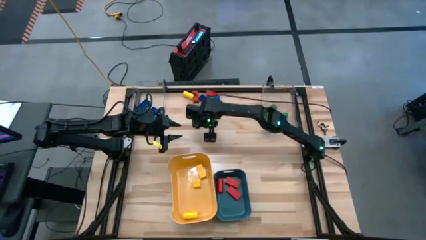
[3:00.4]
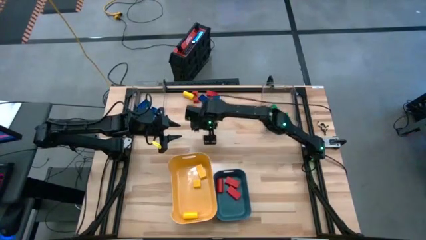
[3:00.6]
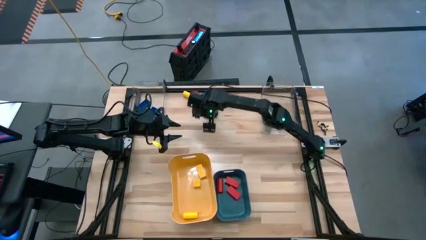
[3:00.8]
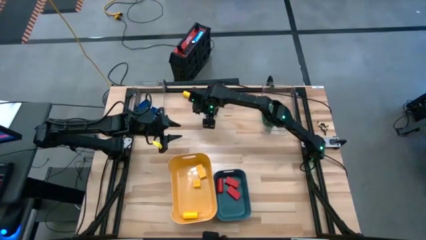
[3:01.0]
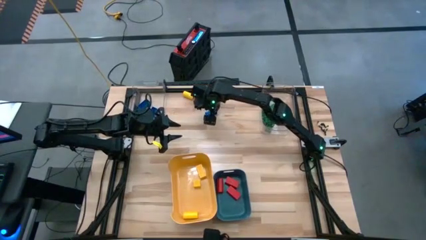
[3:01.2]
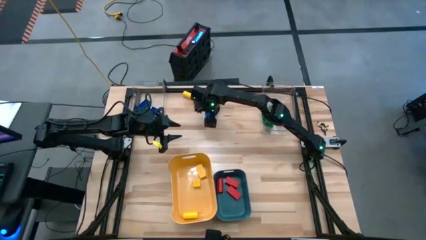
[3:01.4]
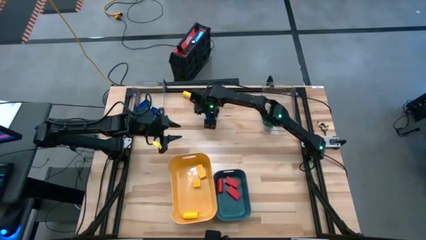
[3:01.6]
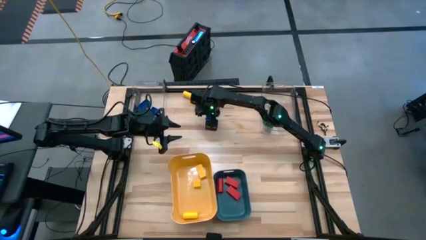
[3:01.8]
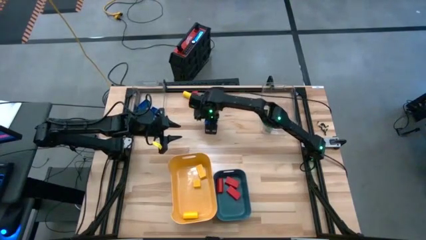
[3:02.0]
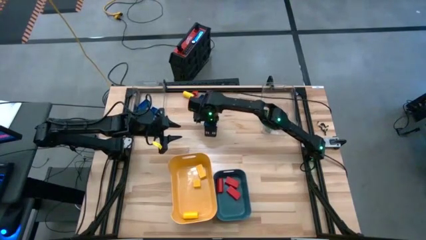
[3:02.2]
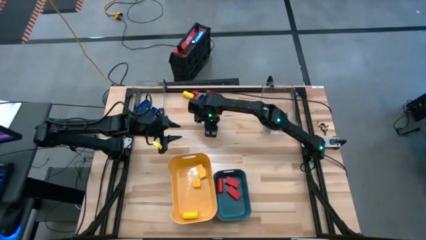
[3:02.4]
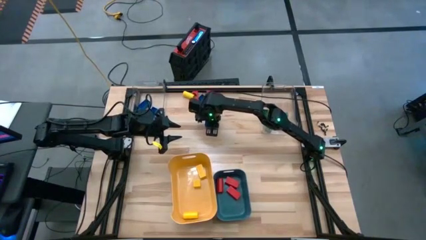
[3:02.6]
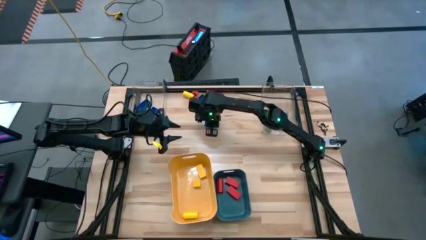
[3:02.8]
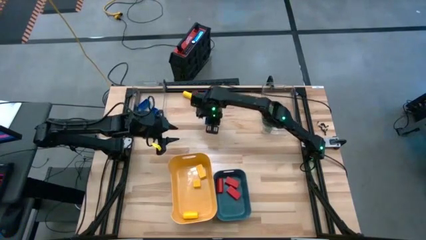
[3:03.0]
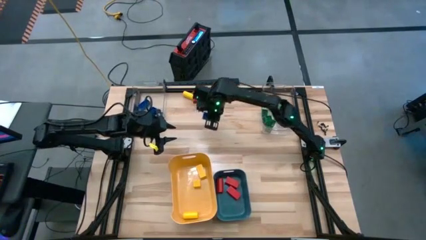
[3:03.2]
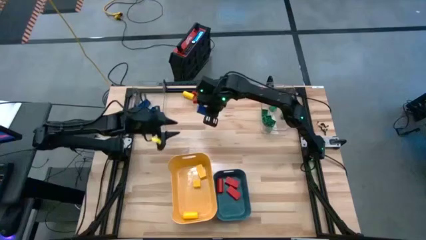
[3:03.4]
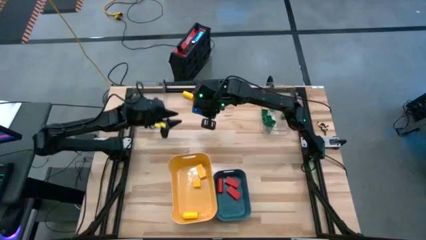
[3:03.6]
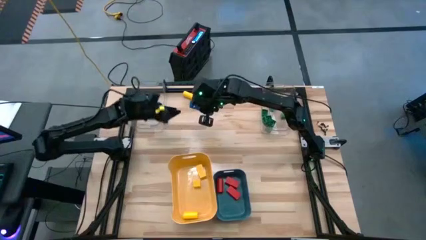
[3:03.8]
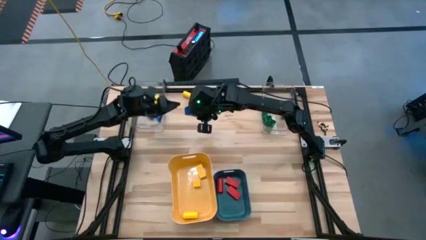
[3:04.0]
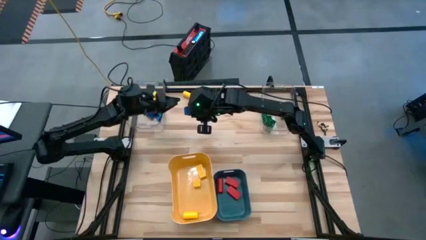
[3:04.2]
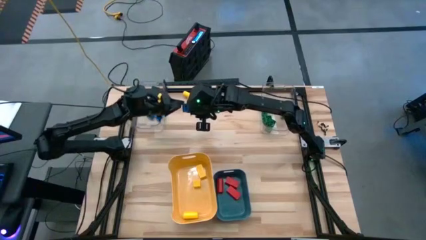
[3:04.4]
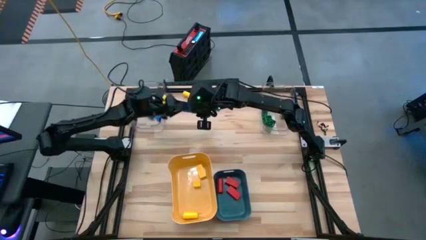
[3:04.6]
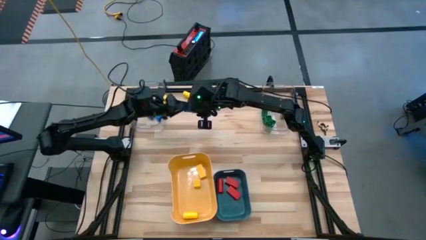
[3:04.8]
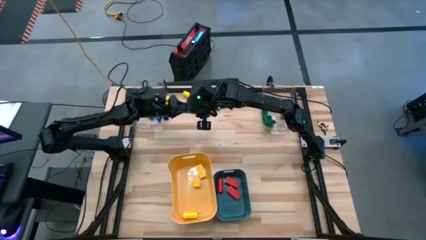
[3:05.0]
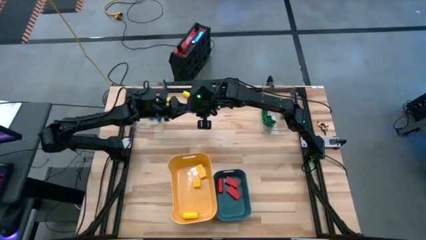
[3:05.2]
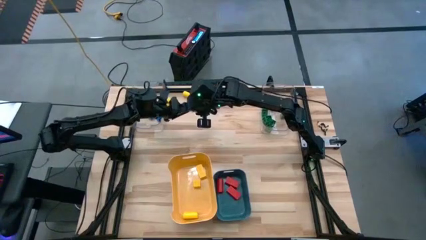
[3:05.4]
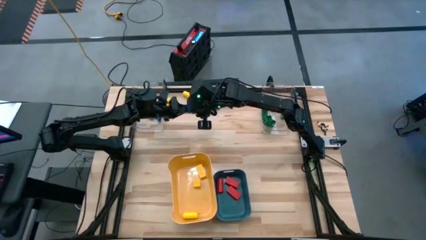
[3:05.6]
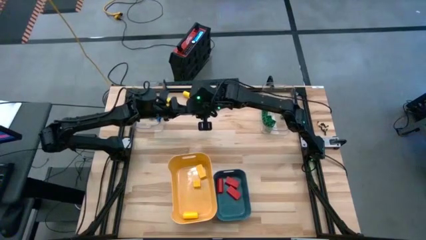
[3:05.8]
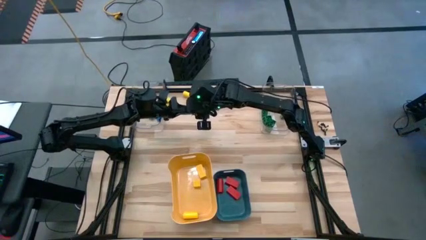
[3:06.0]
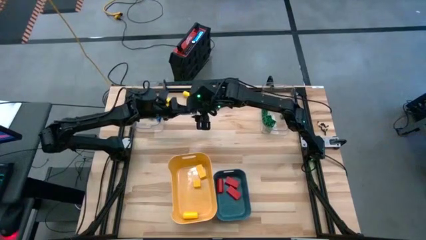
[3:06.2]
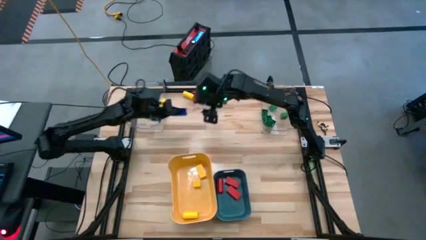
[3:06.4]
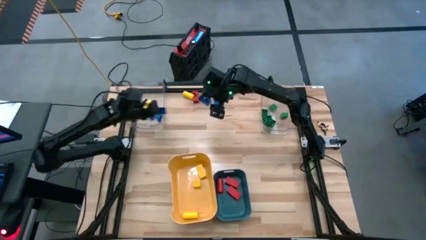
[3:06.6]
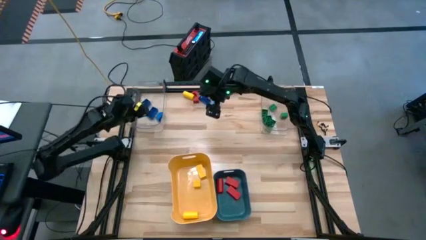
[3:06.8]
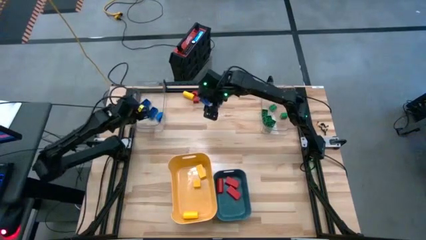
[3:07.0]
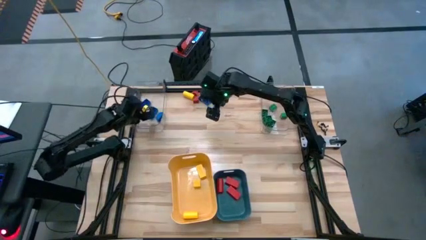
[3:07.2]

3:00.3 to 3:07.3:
Task: Sort blocks
Put the blue game piece into the left transparent bin

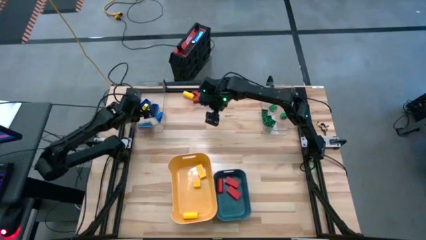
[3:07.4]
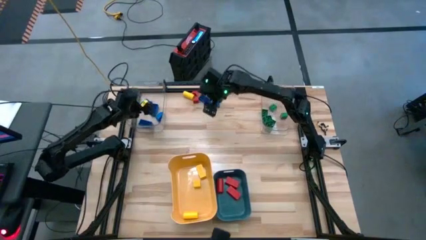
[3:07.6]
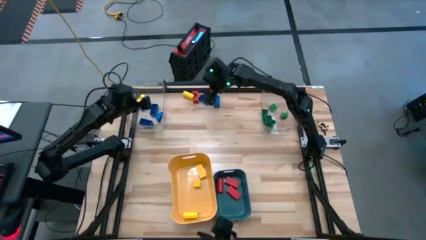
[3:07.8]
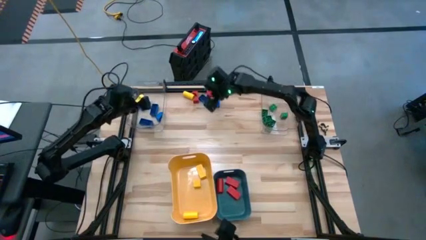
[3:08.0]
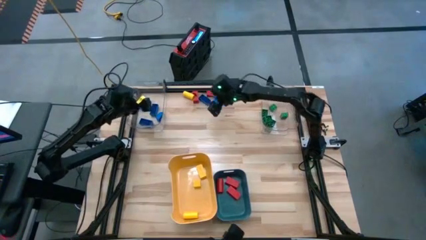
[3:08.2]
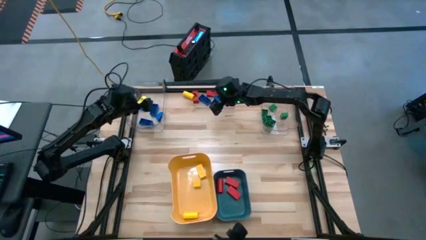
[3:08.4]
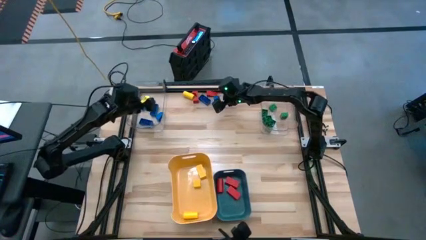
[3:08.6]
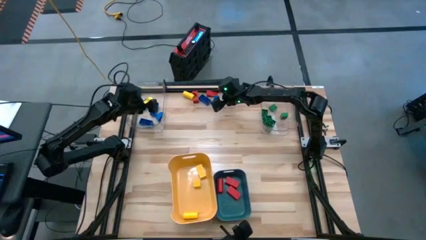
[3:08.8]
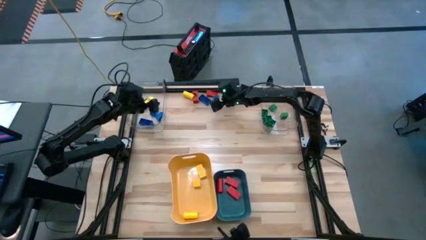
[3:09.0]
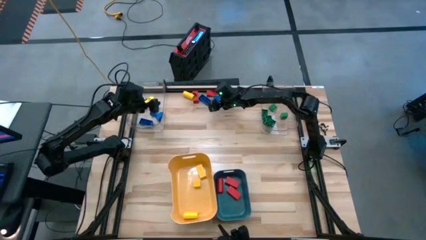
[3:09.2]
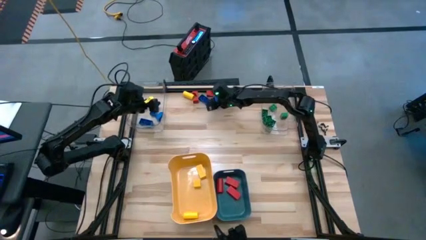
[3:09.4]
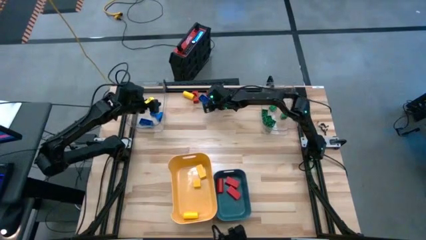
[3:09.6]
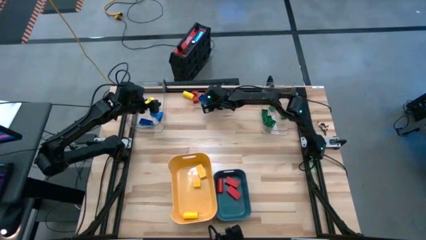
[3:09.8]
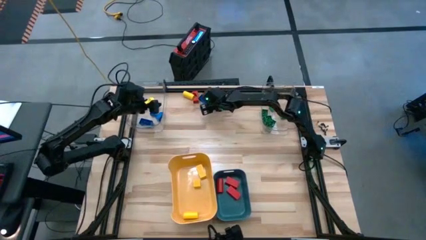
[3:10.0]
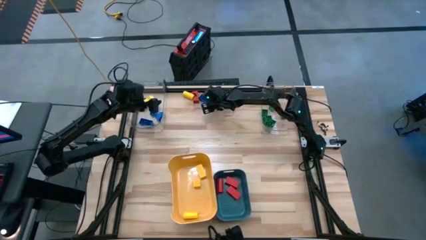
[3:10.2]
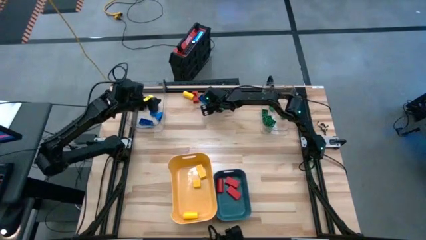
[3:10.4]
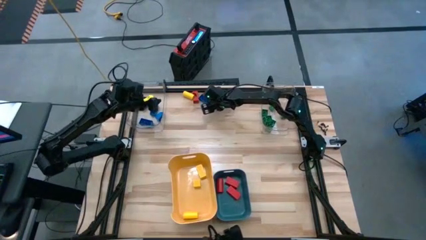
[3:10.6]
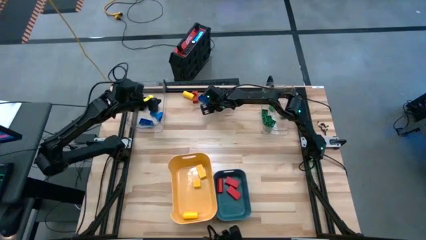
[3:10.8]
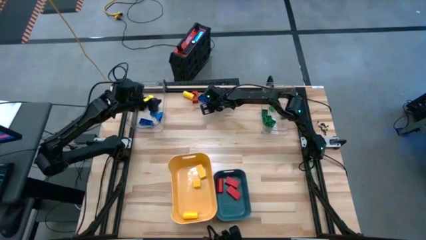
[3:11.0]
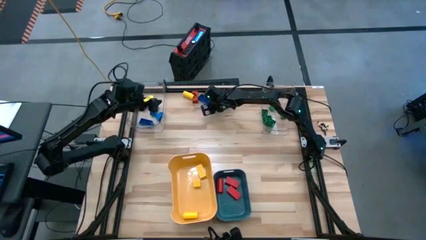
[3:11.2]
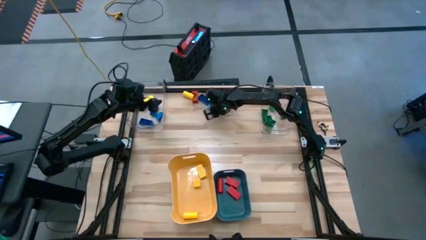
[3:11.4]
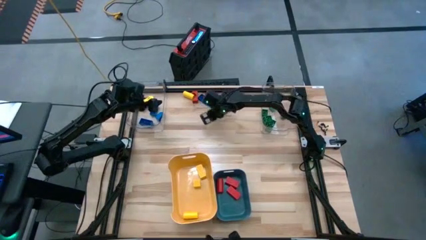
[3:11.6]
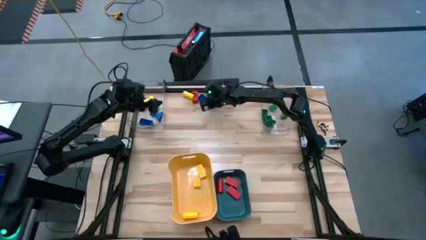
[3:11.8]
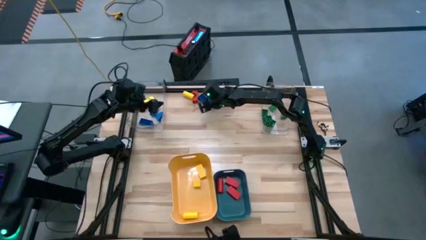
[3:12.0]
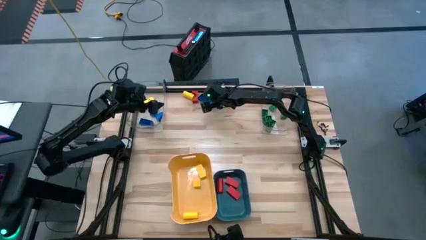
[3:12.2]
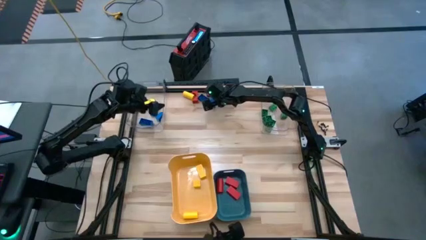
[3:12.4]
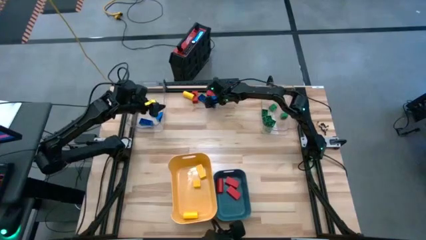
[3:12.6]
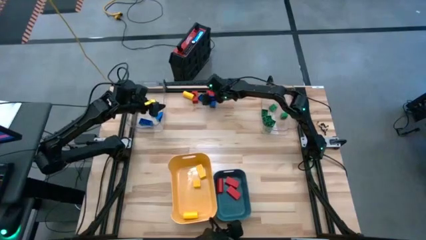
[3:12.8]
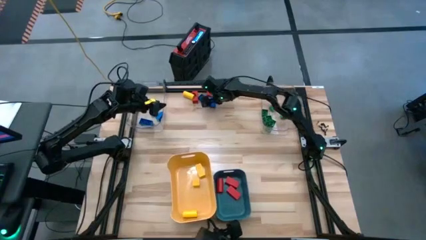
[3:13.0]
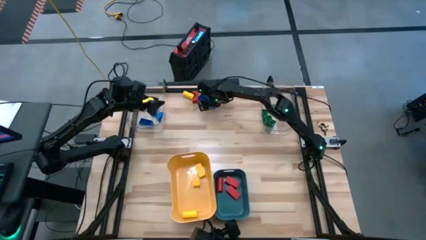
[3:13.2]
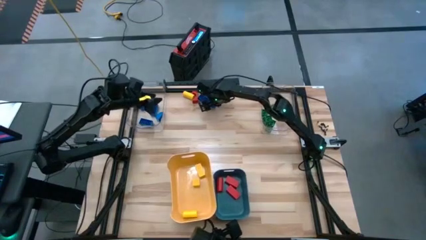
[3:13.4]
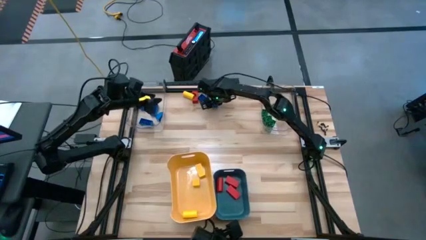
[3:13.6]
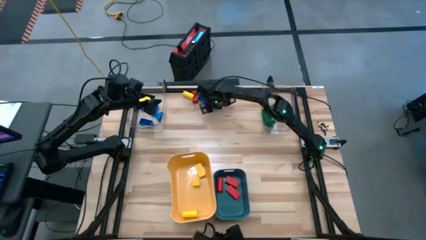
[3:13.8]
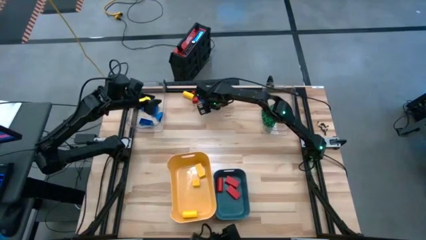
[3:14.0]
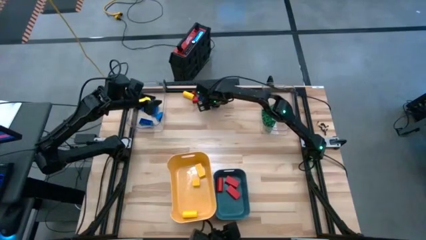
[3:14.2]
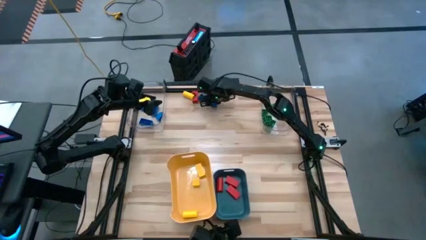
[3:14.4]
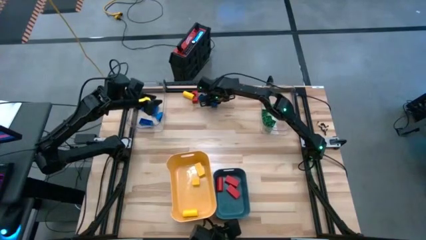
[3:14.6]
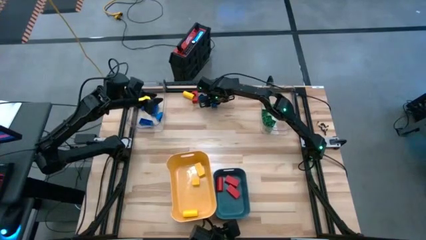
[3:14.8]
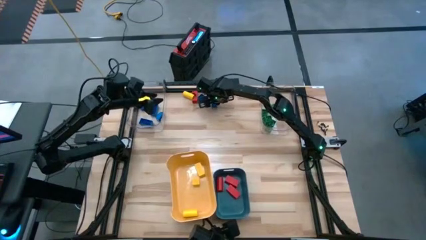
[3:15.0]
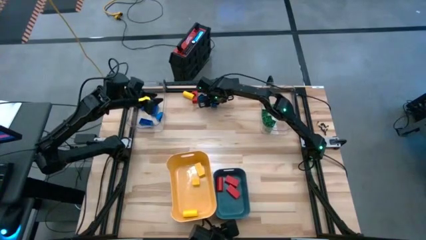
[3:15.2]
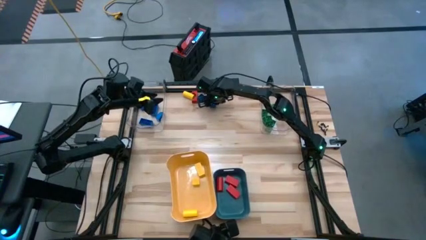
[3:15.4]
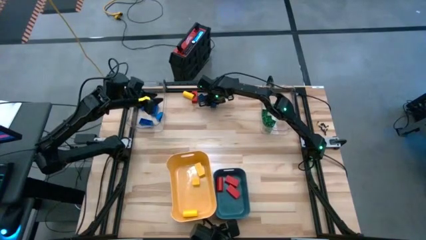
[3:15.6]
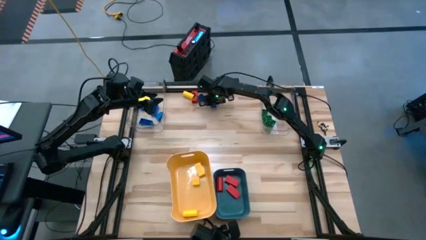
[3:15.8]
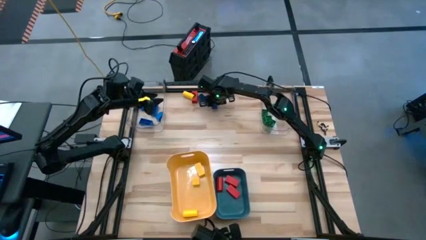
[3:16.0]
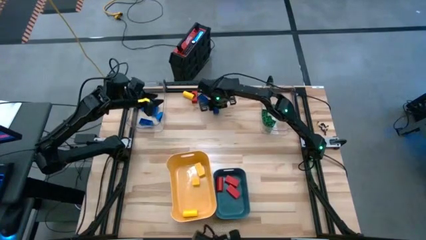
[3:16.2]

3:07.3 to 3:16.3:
Put the blue game piece into the left transparent bin
